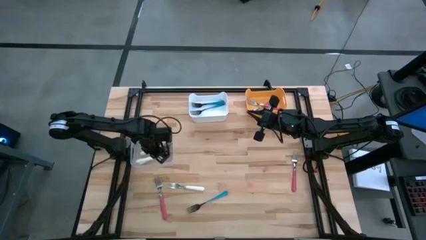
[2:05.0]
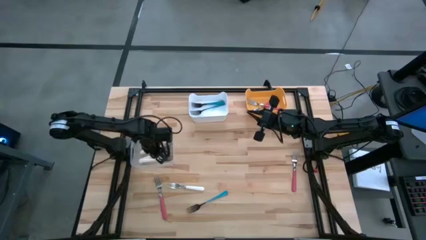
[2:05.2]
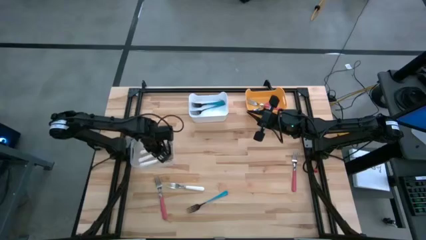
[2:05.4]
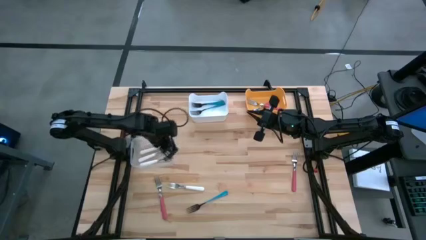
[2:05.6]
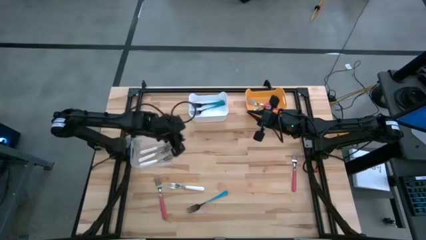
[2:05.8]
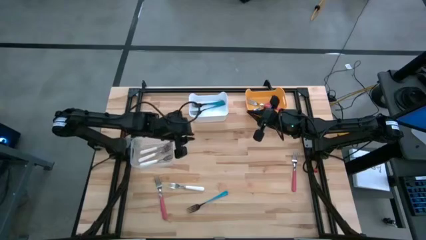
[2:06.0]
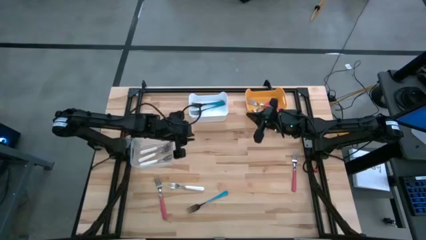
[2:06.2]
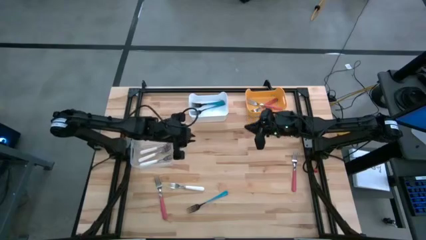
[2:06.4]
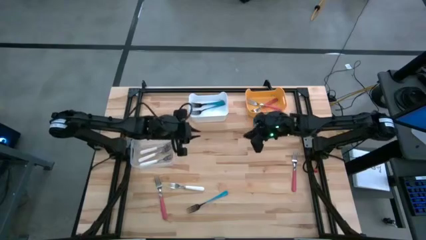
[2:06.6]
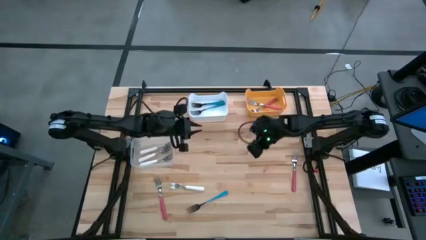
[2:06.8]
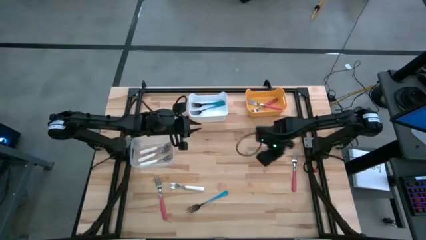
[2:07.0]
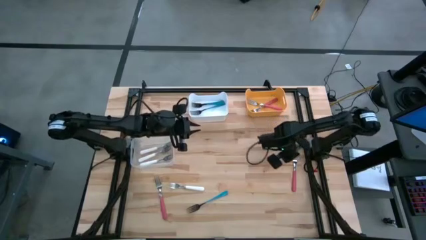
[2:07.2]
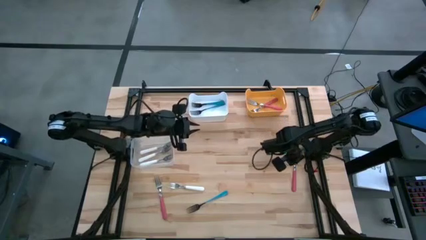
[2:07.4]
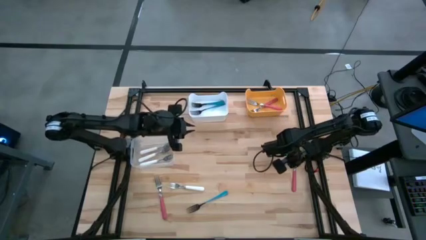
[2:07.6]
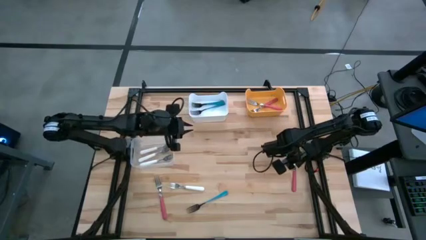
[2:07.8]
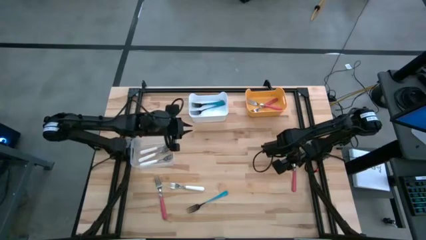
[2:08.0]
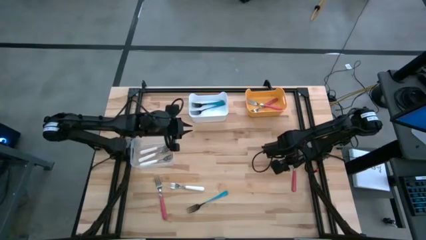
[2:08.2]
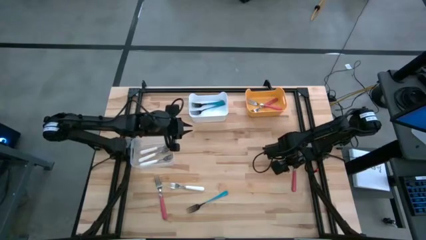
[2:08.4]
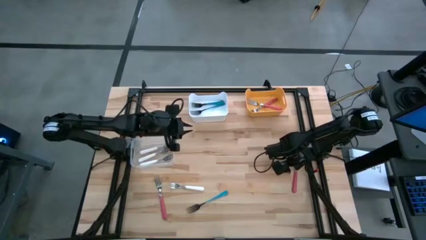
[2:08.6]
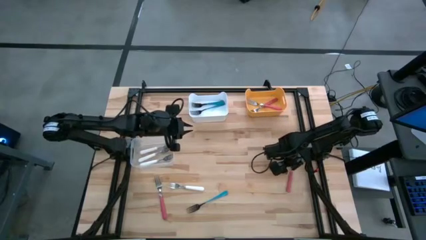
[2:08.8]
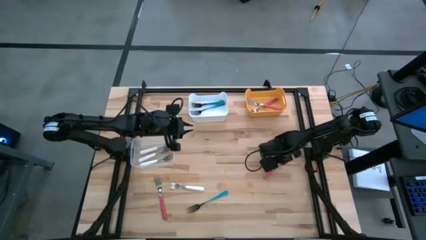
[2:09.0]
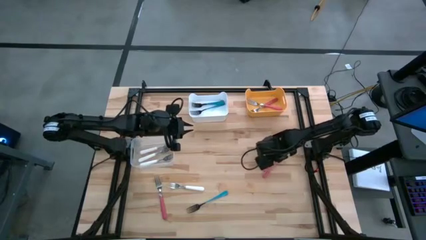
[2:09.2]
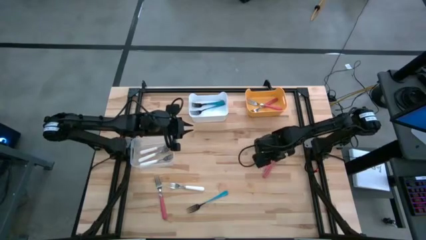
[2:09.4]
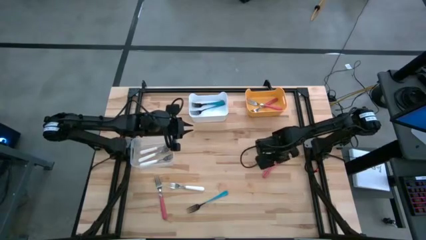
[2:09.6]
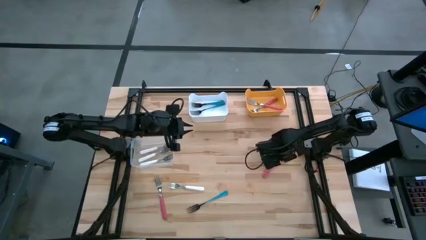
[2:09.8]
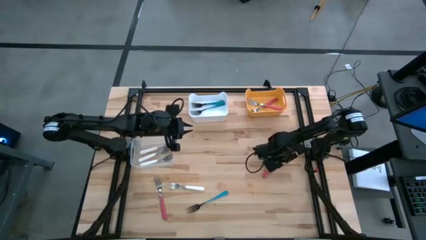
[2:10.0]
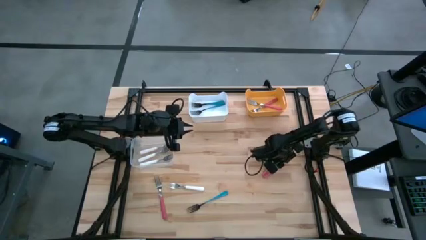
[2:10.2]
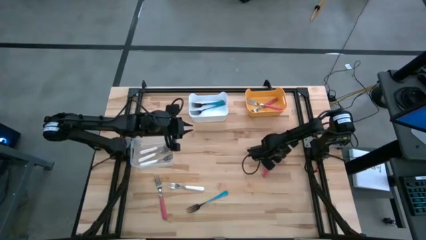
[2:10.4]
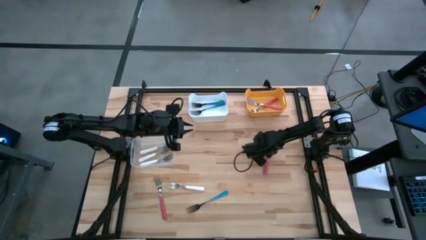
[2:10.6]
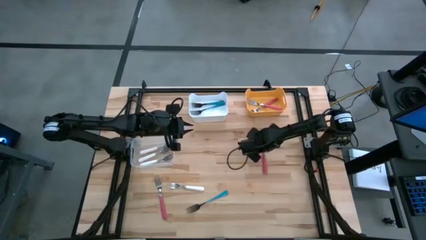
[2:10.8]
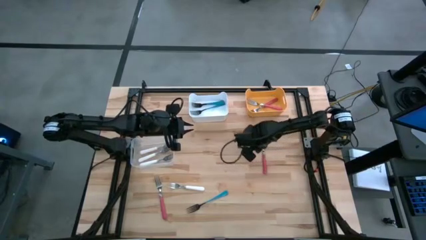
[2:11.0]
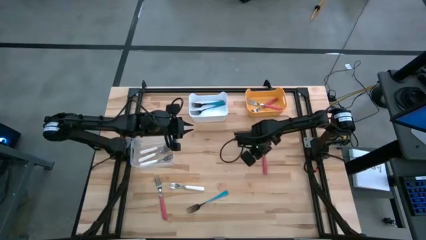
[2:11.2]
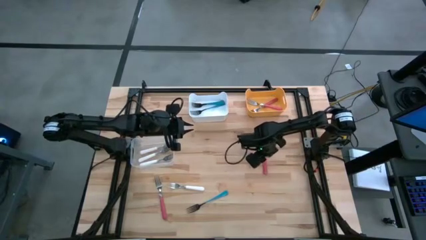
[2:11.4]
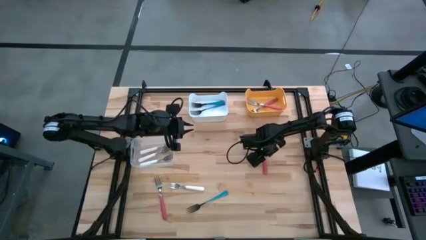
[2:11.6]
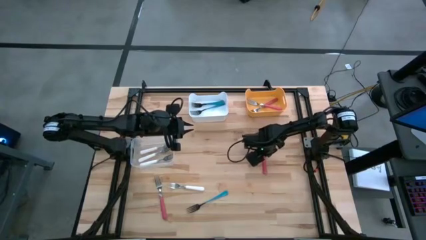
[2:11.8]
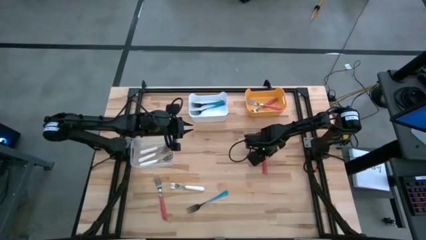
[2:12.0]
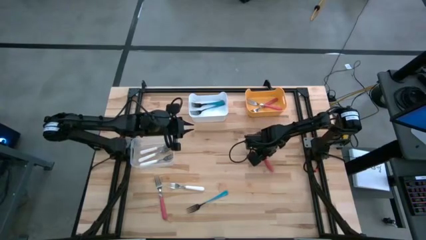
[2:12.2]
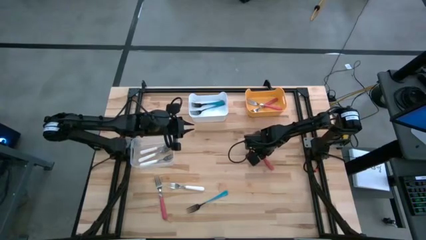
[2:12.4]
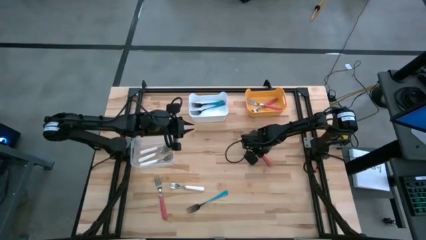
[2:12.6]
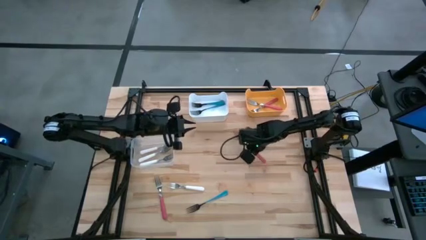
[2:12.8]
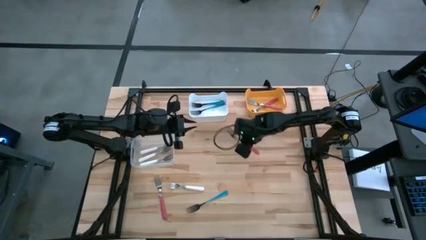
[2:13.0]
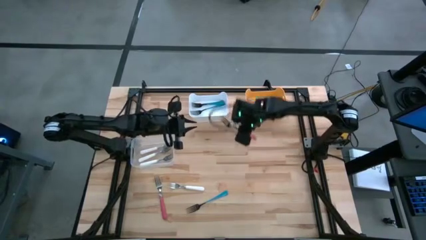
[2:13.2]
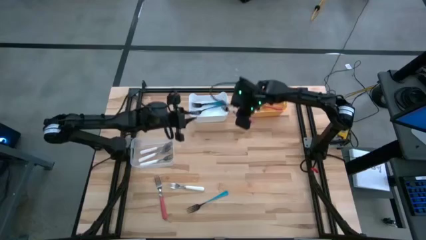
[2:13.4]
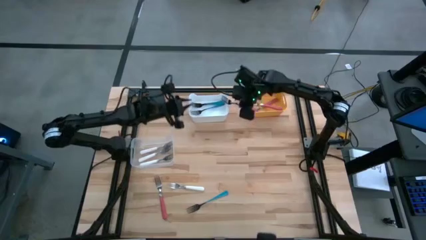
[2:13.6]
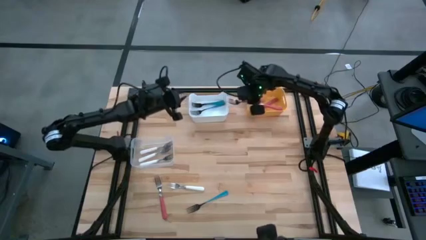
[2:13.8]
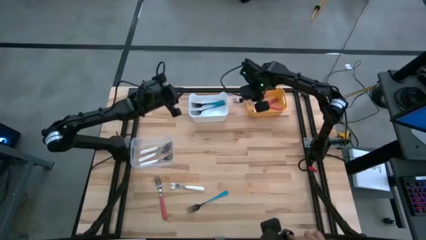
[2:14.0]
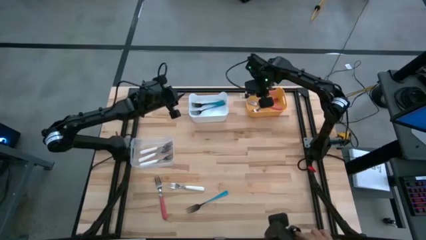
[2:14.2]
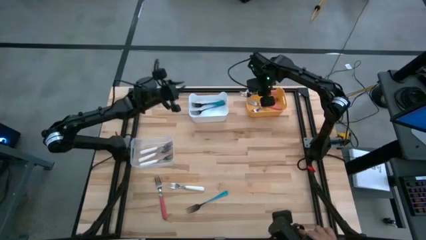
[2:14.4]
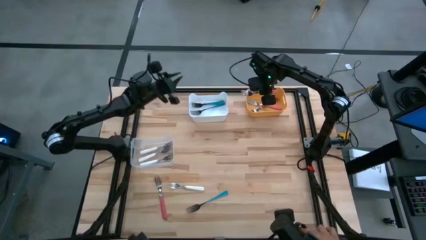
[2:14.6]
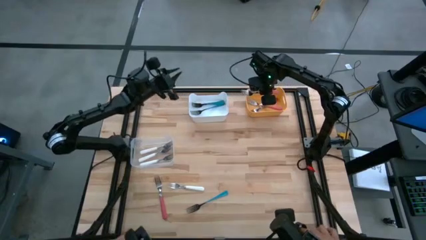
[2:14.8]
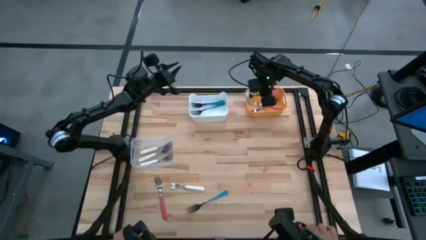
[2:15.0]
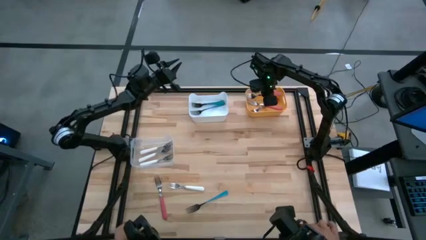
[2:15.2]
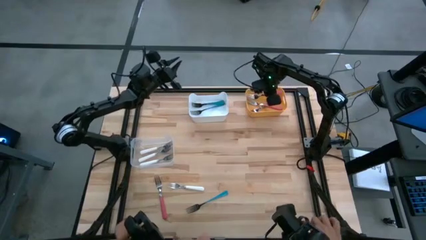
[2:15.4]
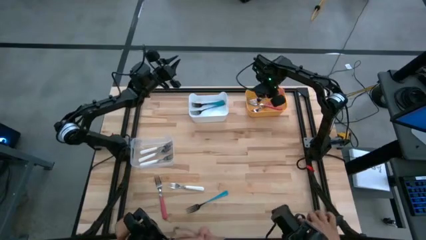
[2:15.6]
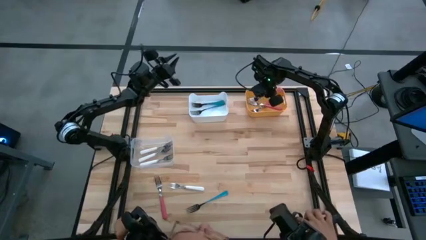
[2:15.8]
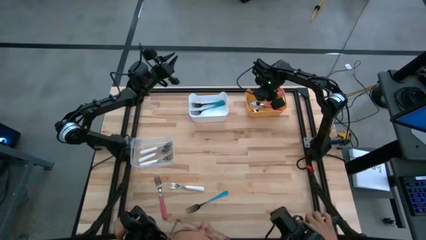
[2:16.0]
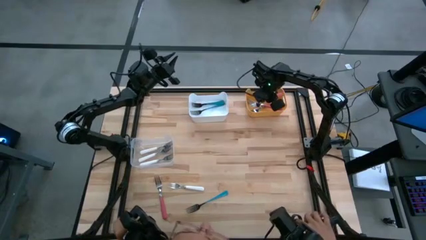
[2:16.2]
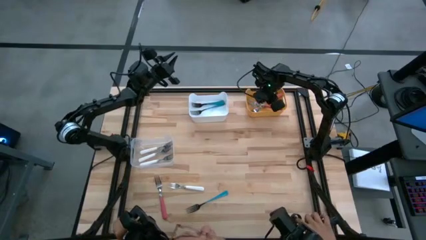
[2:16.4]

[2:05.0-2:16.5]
Task: Sort silverware by color (type)
Put the right pink fork into the yellow bin

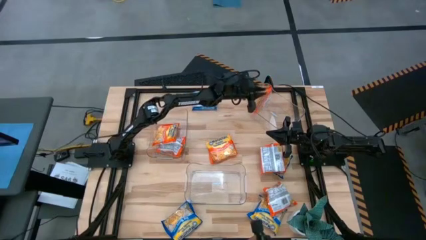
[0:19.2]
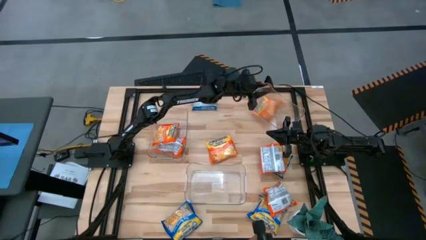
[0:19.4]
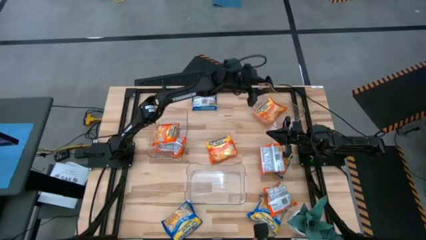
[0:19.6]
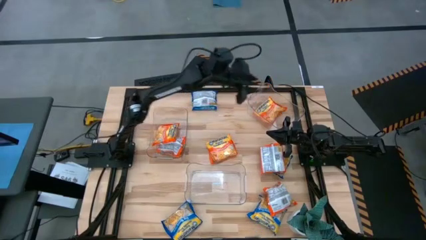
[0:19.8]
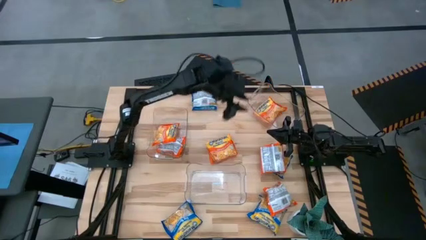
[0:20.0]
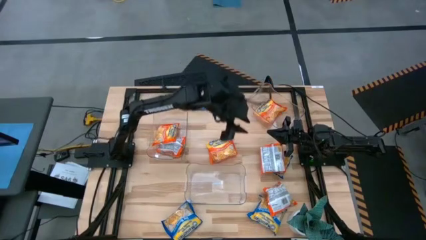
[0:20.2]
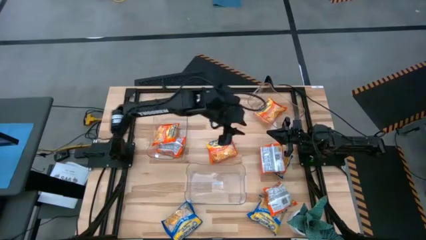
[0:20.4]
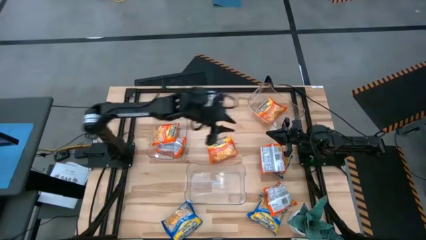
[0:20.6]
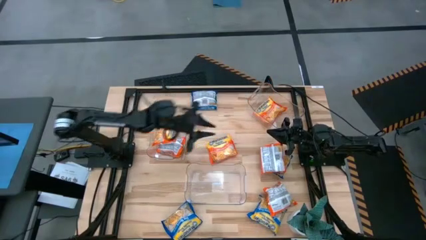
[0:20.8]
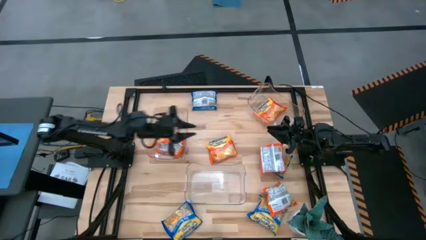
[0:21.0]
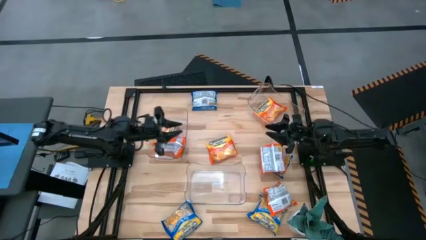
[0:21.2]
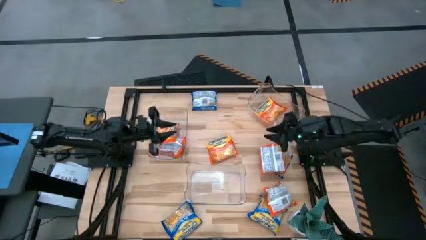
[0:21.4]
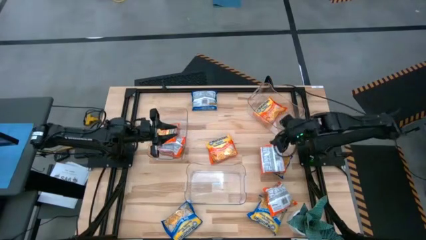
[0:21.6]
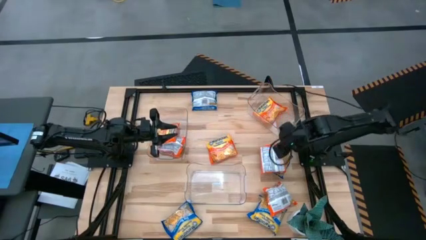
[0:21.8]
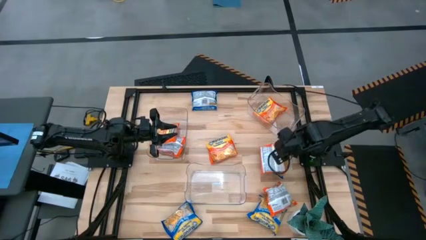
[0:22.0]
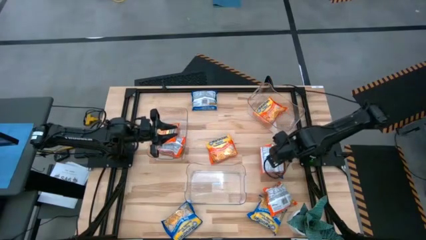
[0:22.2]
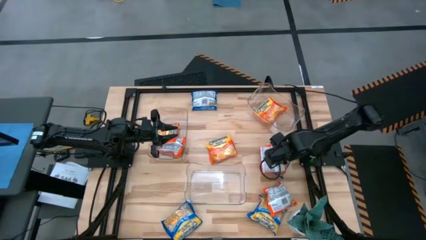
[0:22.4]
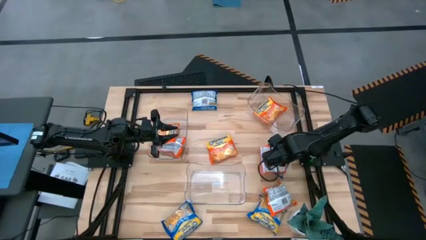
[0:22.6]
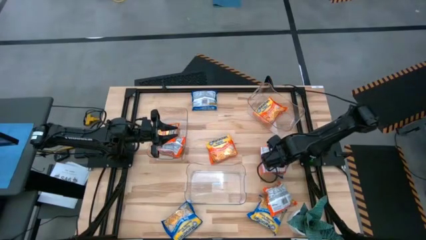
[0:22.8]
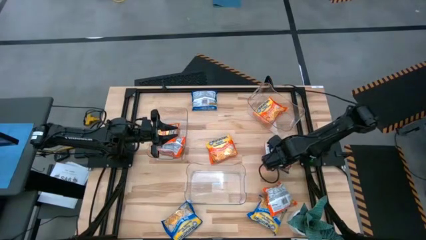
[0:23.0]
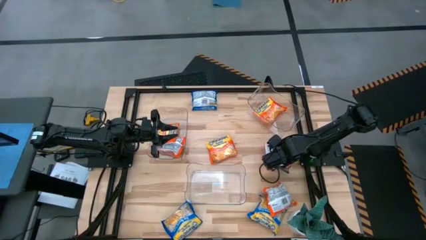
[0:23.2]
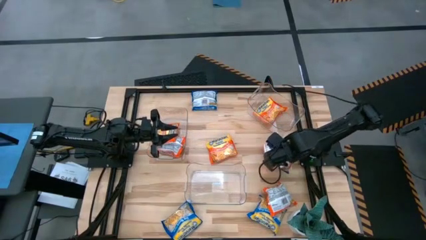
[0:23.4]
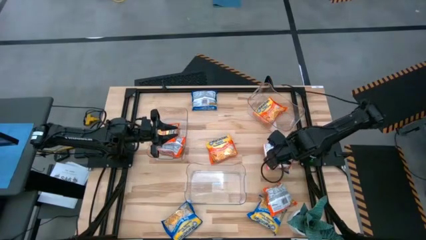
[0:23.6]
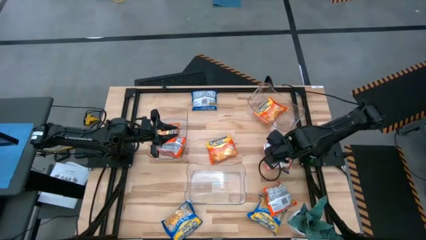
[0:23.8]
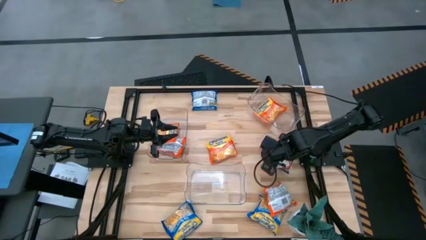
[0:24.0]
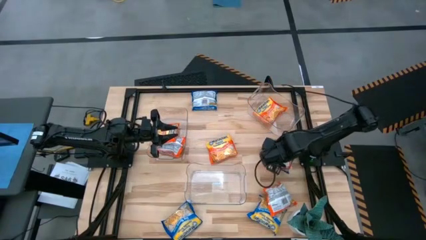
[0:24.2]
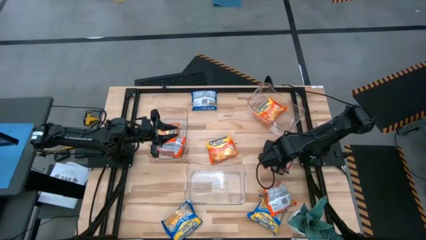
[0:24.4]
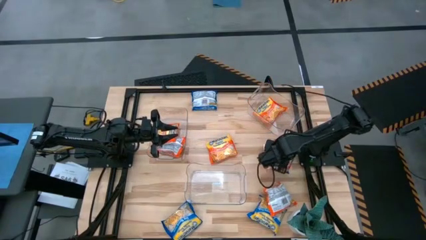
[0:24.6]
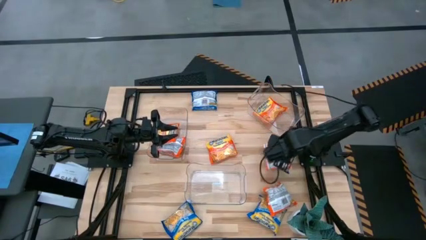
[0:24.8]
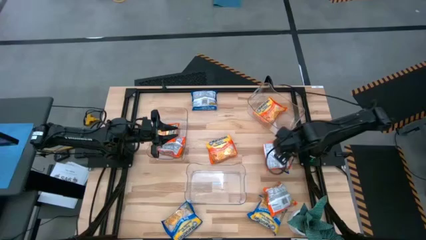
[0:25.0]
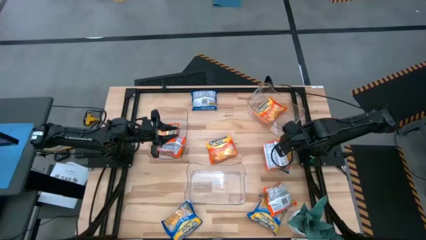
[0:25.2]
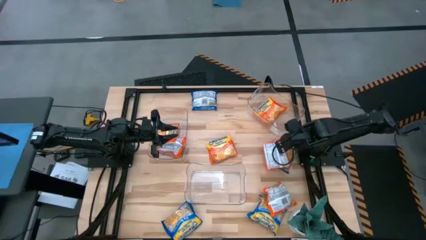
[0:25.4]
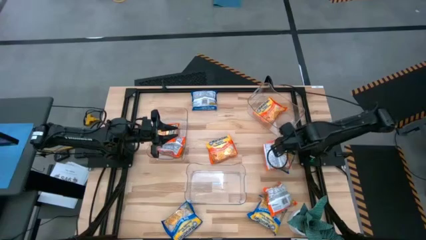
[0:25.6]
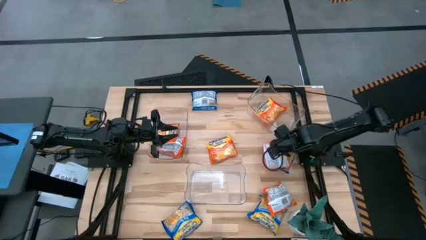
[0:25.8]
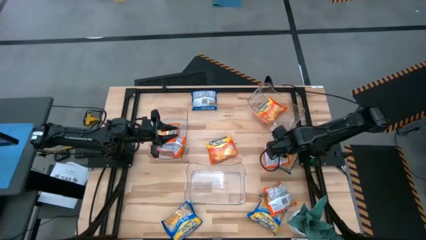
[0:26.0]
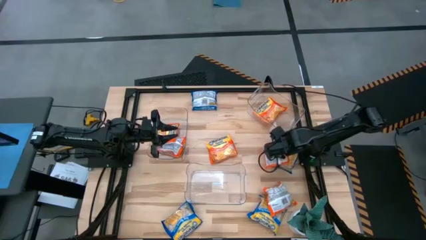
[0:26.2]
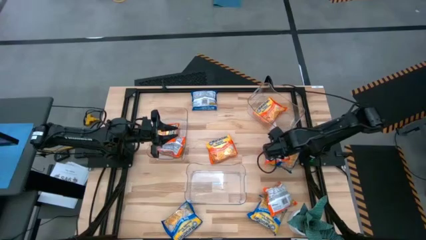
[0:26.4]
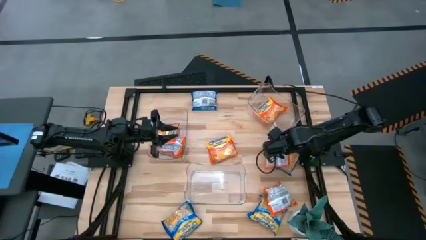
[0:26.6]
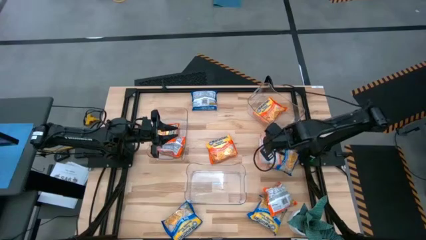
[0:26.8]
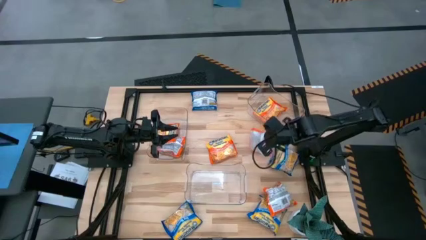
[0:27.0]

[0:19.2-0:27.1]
Task: Sort Maruchan noodles
Put the orange noodle pack into the top transparent bin
